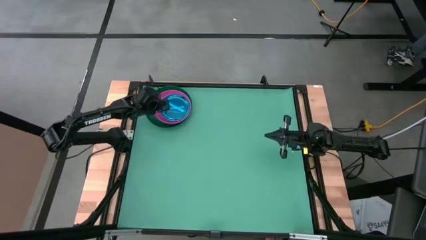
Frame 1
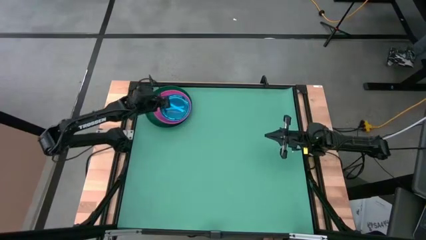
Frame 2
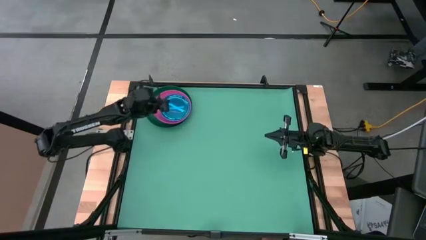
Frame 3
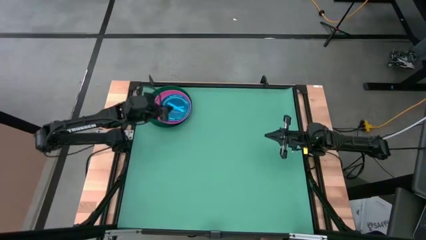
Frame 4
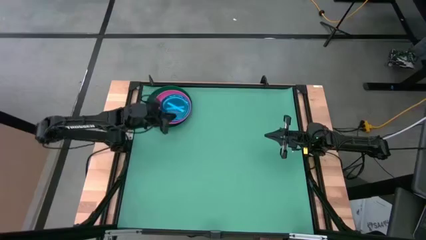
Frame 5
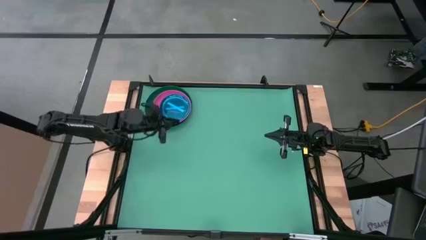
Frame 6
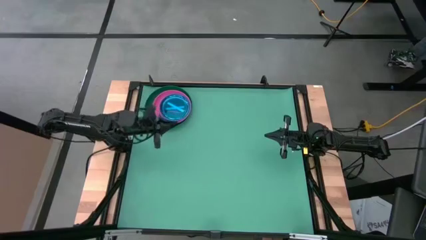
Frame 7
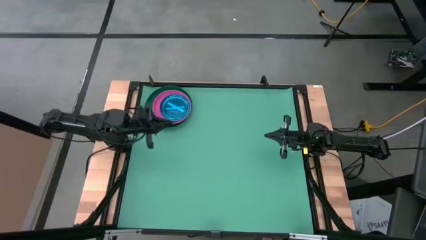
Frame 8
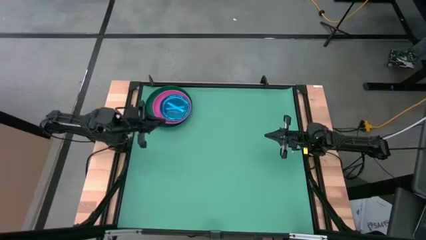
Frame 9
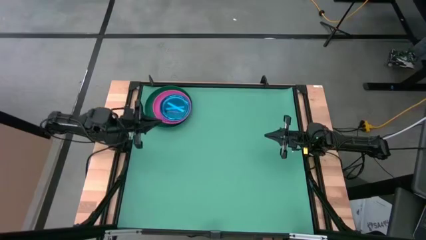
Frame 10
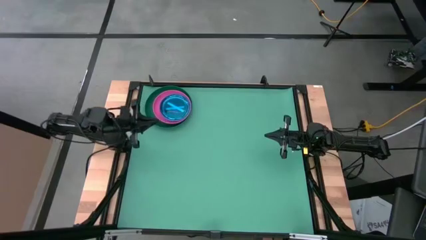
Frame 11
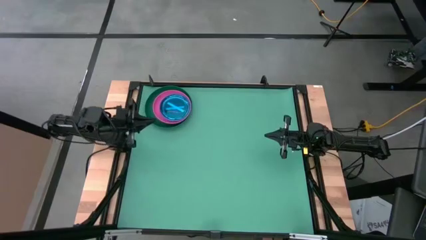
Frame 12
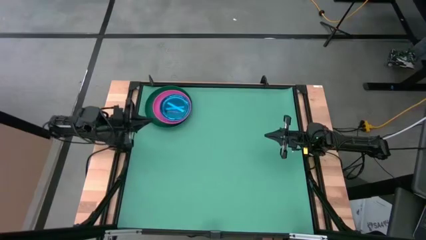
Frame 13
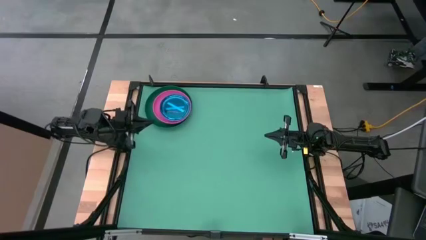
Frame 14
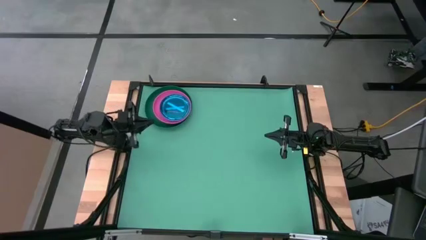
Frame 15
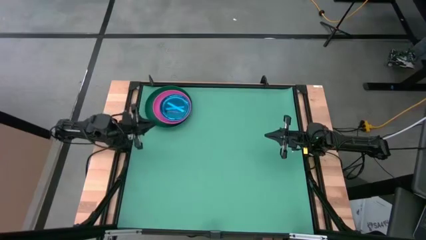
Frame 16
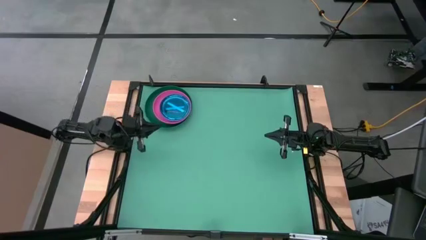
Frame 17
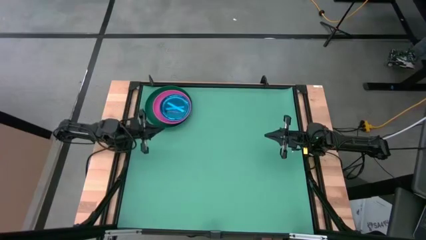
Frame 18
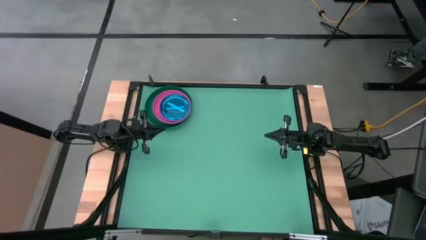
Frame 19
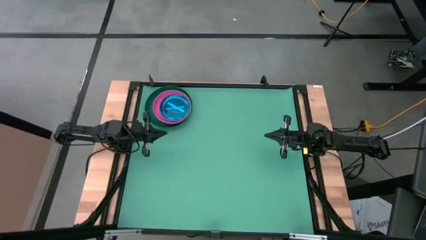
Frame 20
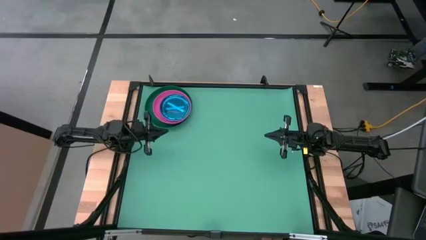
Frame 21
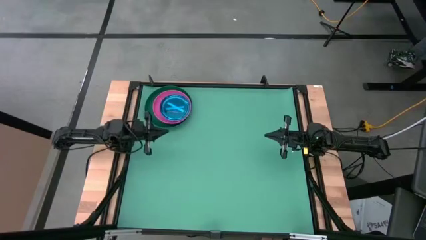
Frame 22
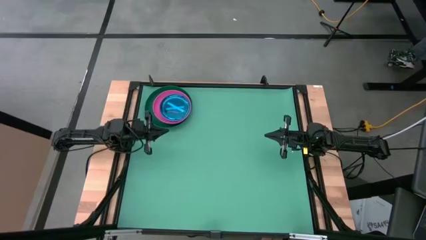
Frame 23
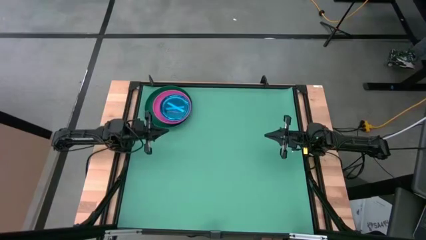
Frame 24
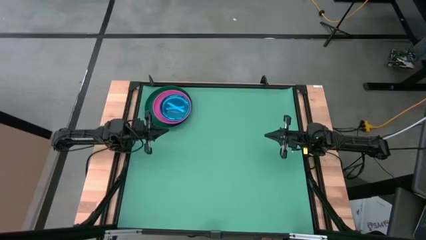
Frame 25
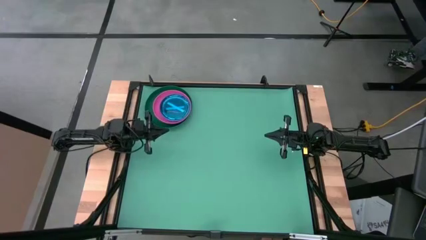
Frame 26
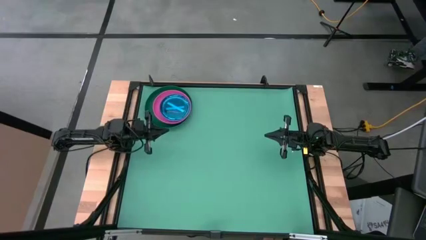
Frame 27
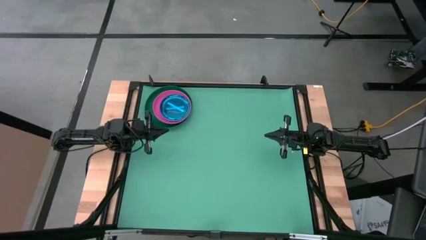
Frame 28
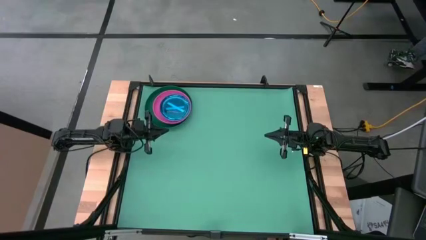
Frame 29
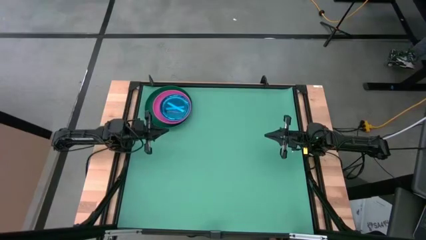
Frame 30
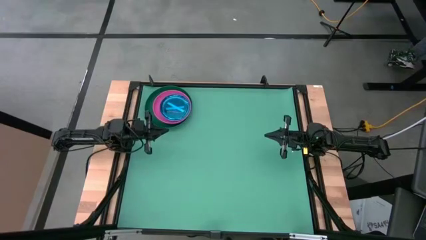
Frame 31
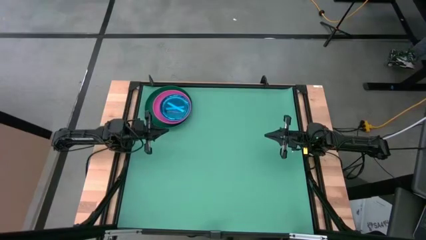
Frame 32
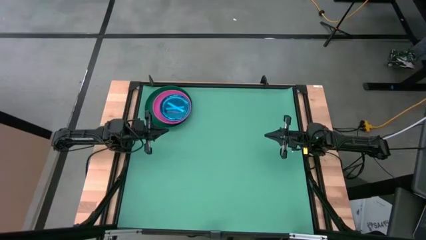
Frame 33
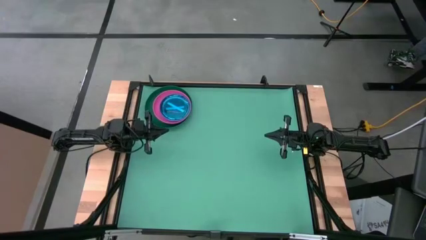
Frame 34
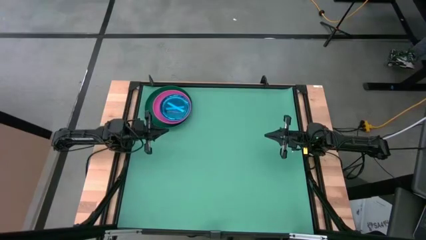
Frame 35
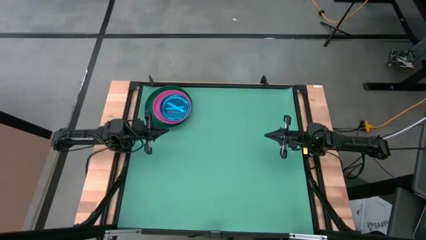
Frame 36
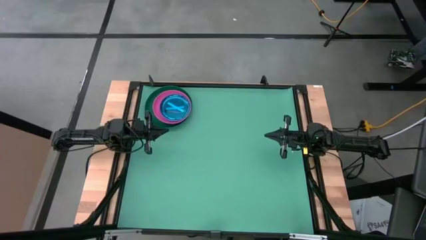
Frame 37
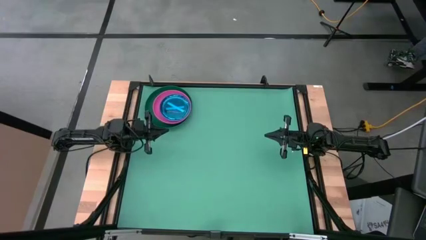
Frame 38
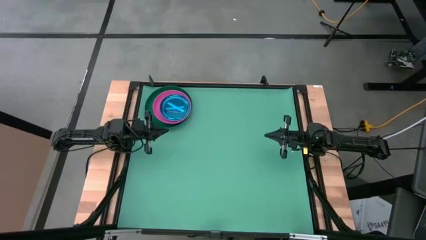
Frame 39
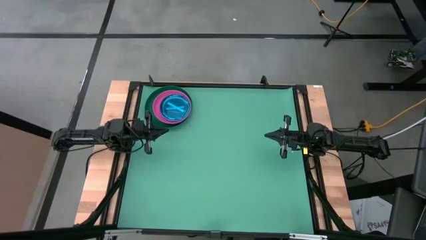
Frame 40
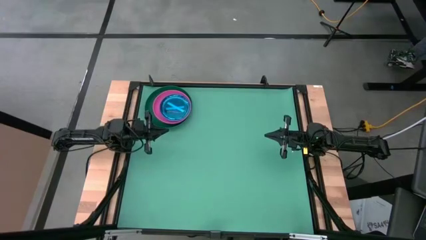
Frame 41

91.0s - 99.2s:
Task: Stack plastic plates
Return to Home Position

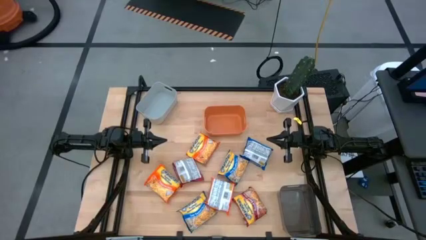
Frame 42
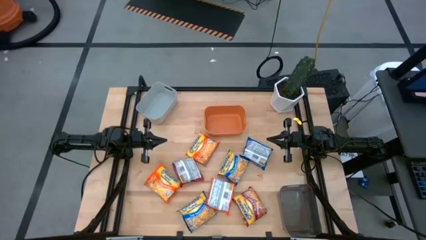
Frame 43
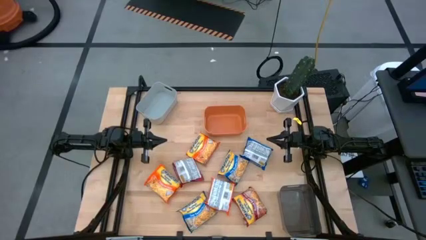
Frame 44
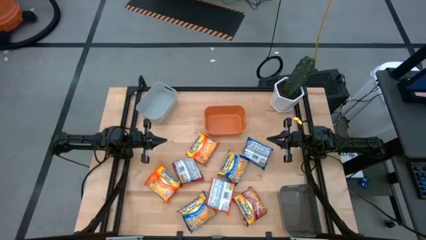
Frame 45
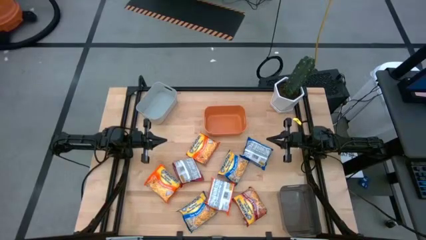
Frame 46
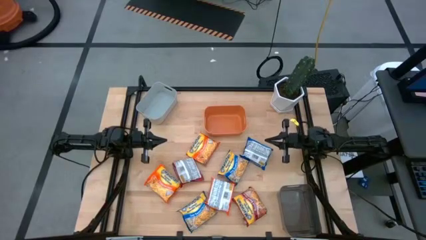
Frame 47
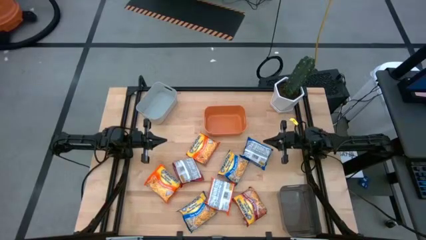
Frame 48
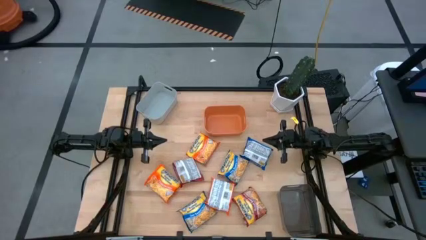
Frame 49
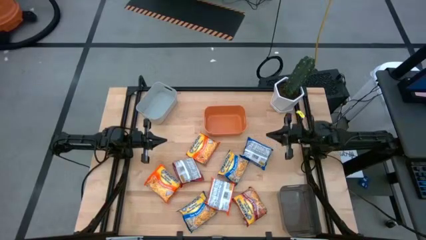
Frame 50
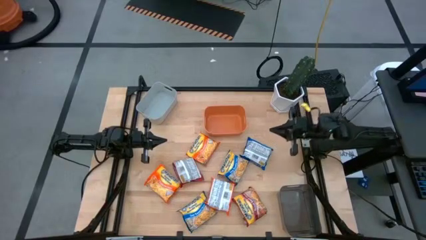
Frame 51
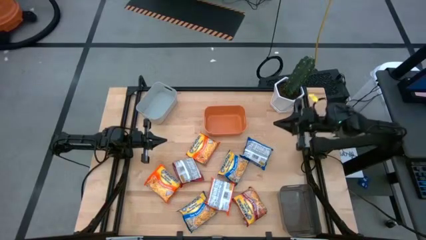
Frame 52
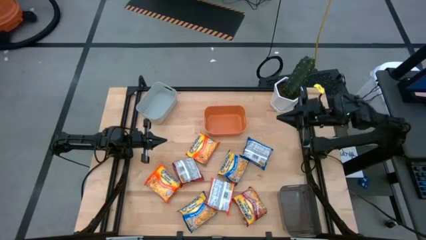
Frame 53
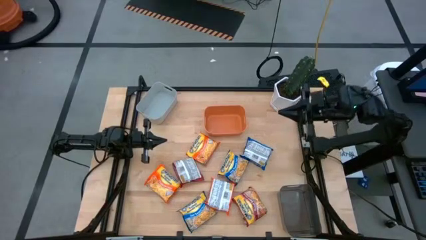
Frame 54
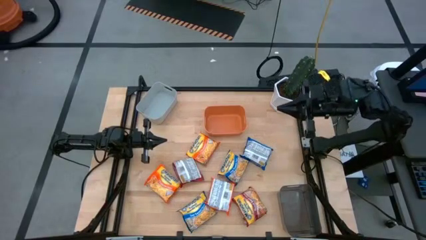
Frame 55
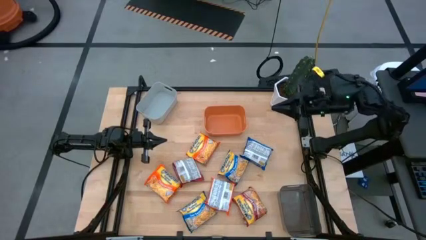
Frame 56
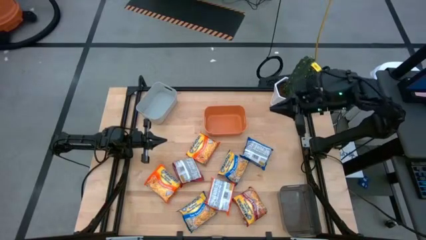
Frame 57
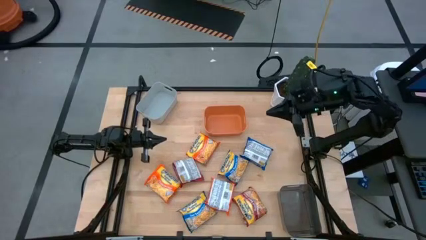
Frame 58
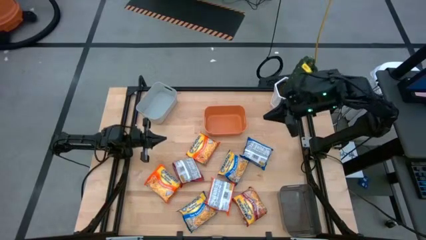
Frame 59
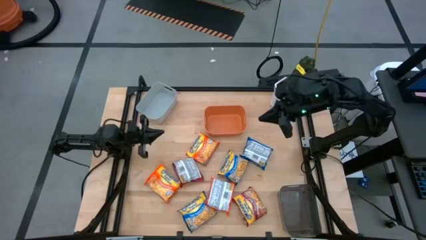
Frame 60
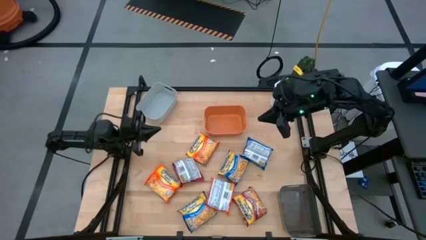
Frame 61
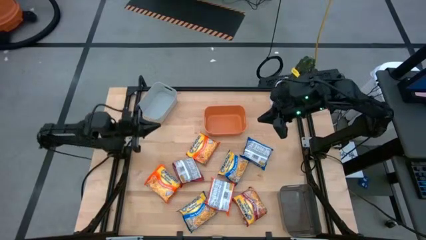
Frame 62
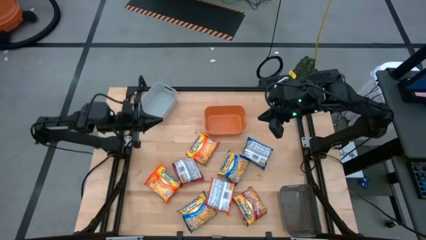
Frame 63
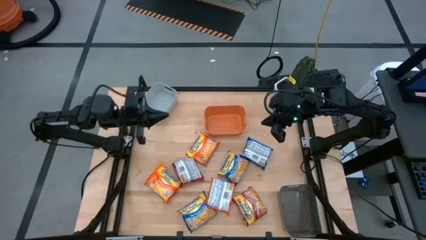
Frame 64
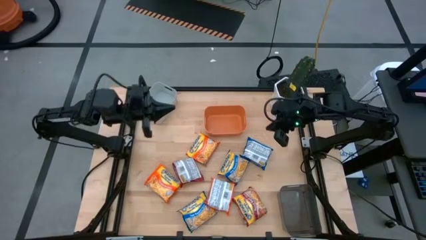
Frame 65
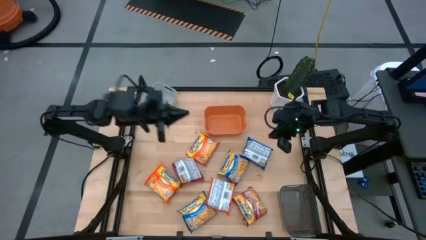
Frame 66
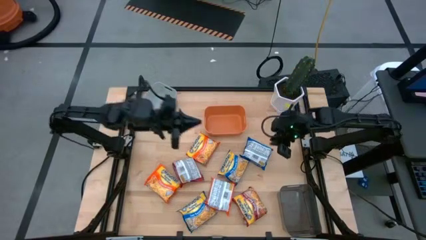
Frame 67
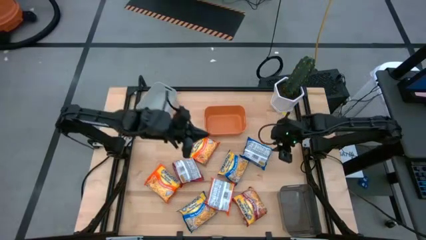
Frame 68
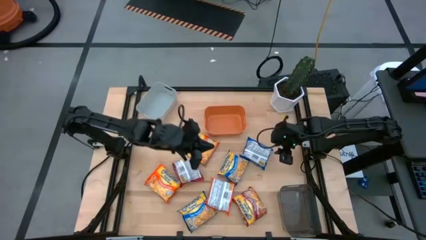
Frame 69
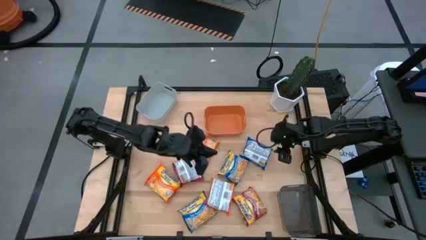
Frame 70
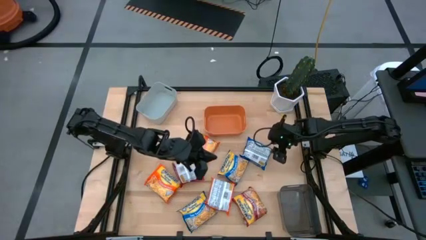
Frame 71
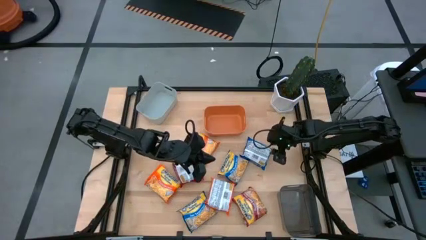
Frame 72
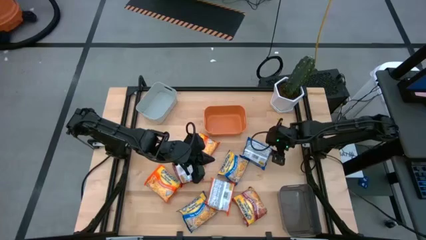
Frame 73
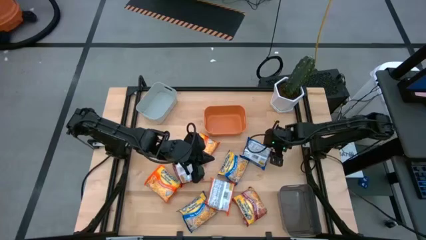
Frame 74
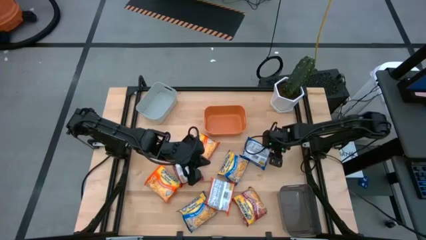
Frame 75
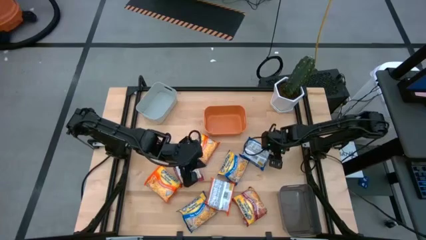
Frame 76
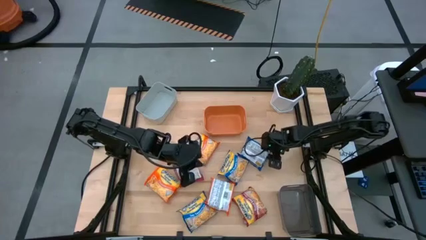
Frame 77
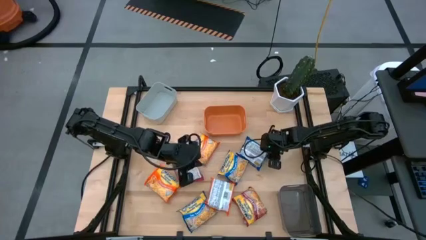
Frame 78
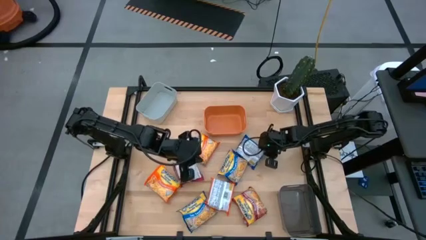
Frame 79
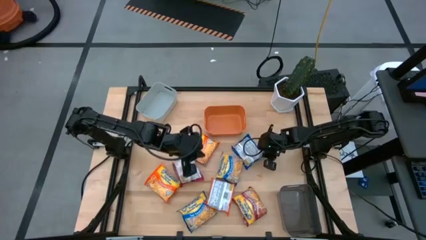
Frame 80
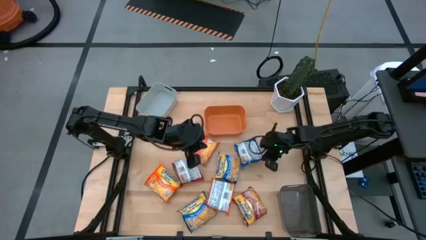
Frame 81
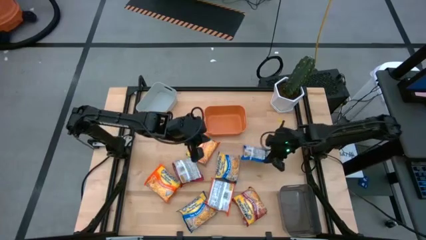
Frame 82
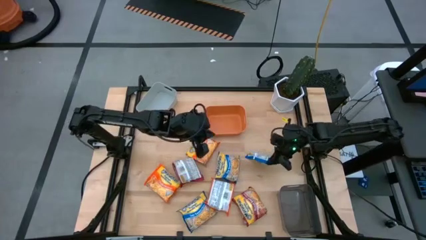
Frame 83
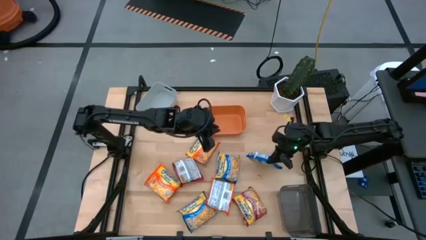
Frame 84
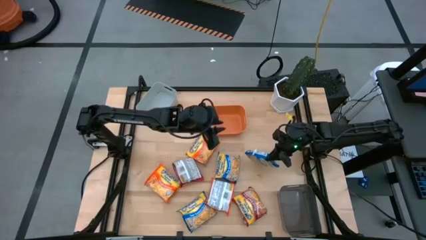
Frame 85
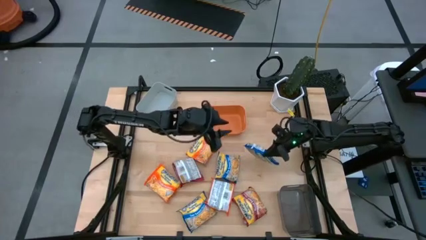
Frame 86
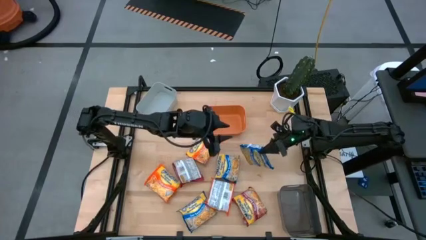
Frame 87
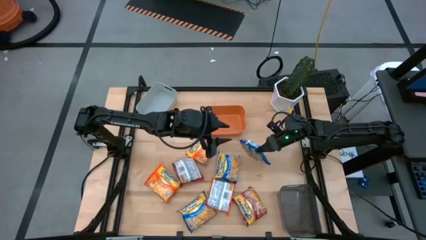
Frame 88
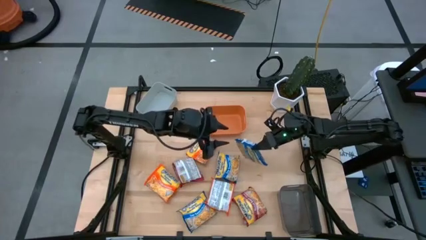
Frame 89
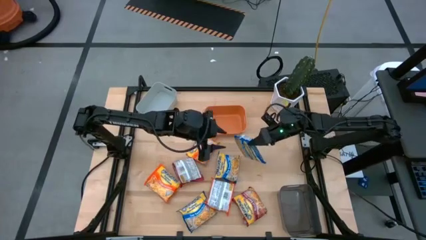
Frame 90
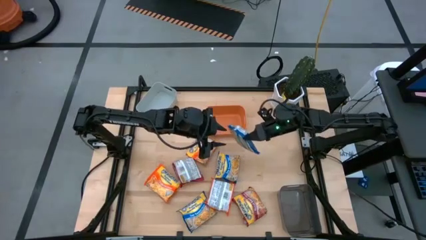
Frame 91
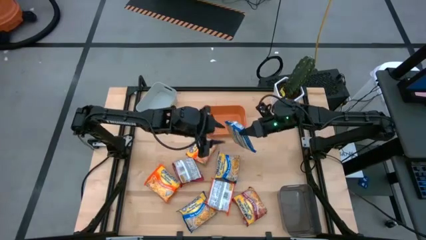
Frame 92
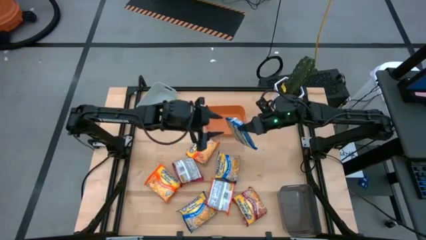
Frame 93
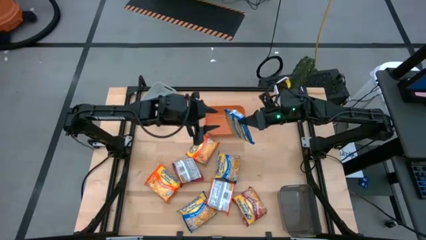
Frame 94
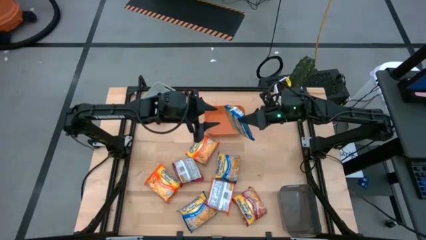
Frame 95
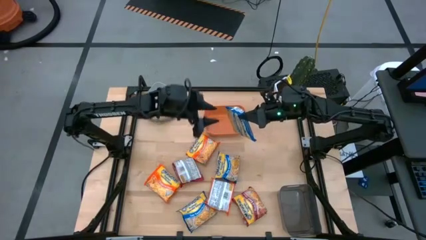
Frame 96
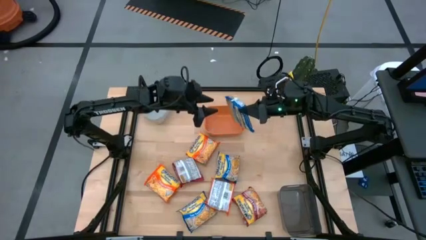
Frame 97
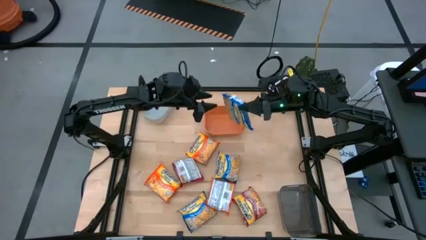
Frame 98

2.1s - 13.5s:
Task: Sort Maruchan noodles
Put the top blue noodle pack into the gray bin
